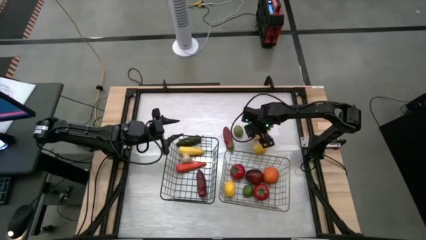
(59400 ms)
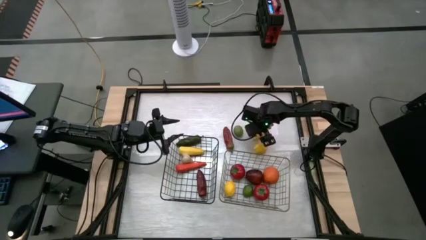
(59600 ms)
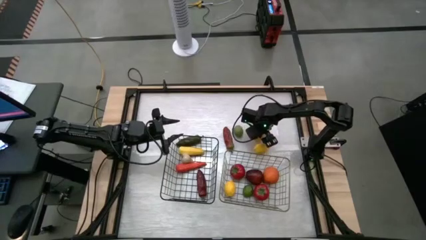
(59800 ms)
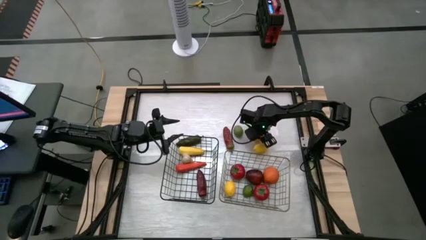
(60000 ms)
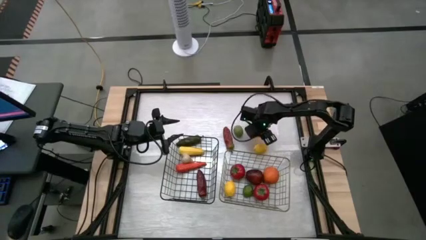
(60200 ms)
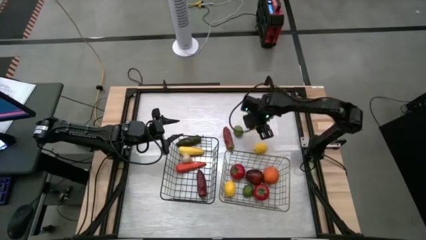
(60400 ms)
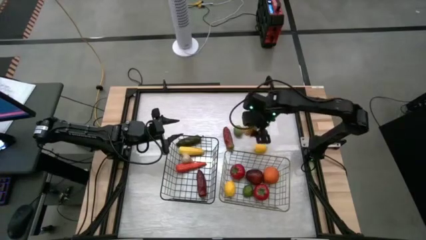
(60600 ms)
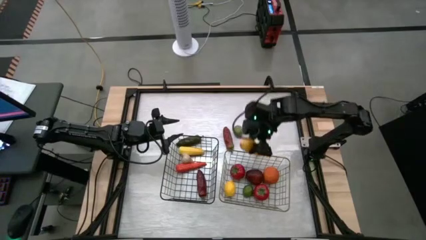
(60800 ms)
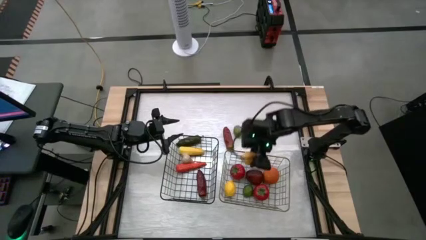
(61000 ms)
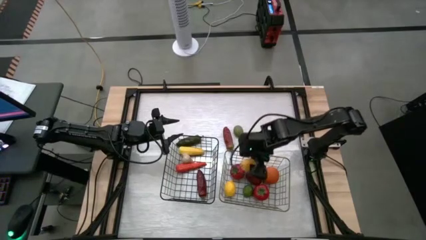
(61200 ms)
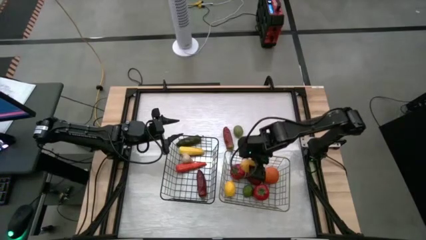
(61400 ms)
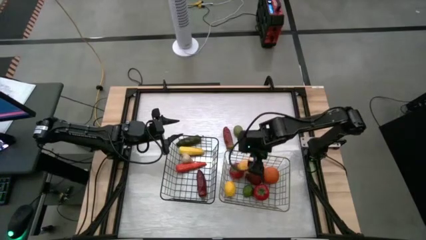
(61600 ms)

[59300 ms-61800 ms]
Task: Sort produce into baskets
Put the left lemon into the right wire basket

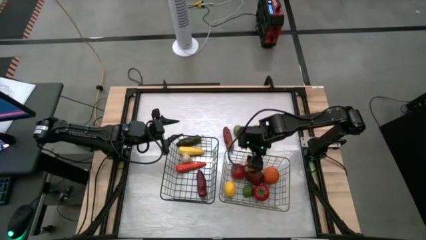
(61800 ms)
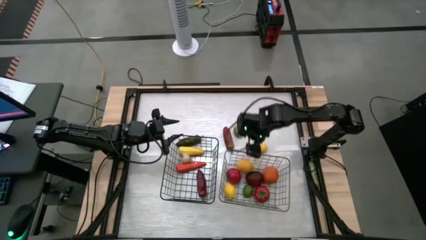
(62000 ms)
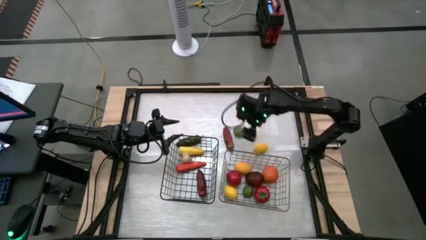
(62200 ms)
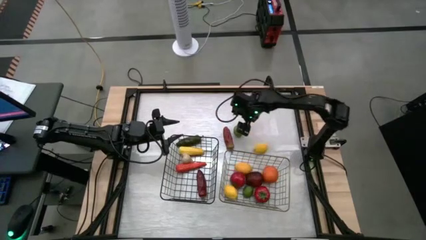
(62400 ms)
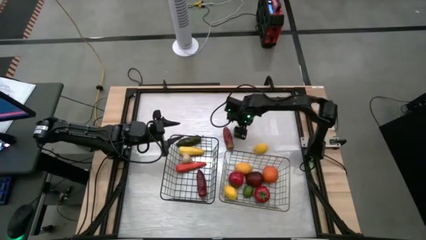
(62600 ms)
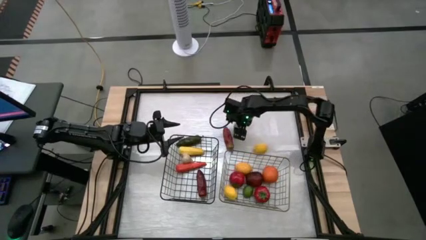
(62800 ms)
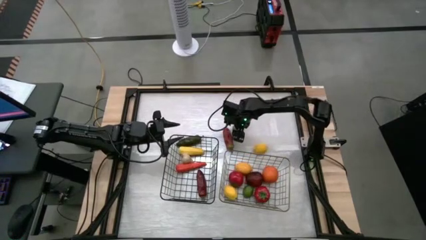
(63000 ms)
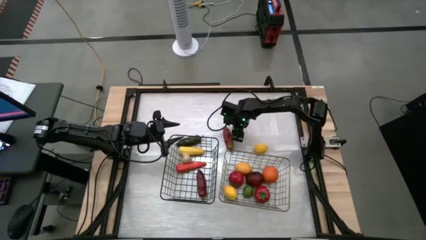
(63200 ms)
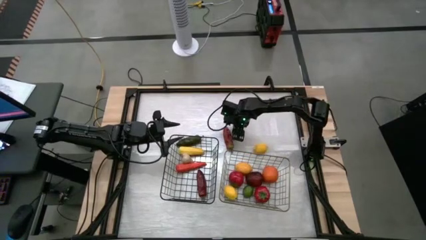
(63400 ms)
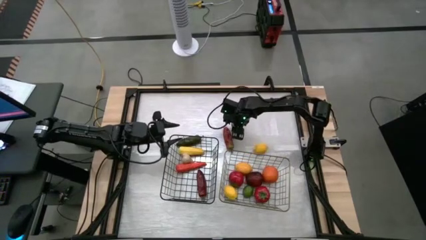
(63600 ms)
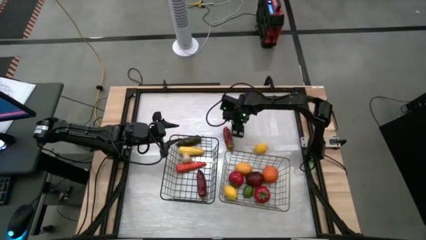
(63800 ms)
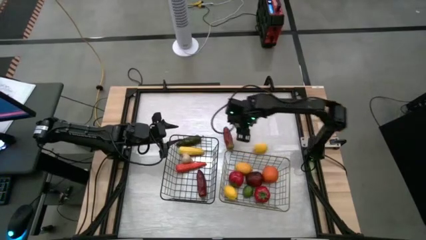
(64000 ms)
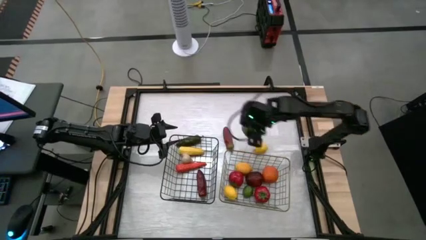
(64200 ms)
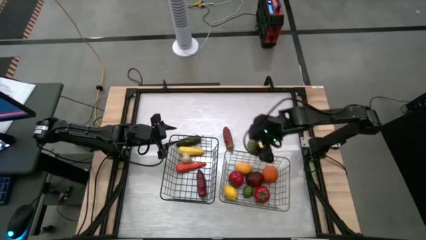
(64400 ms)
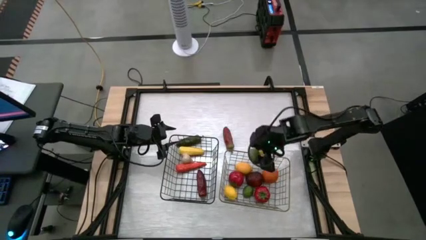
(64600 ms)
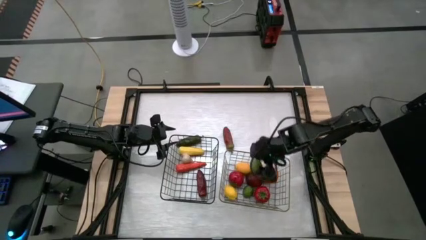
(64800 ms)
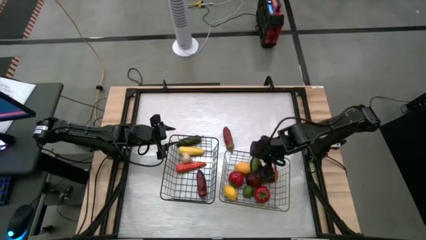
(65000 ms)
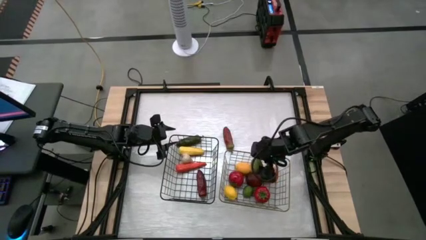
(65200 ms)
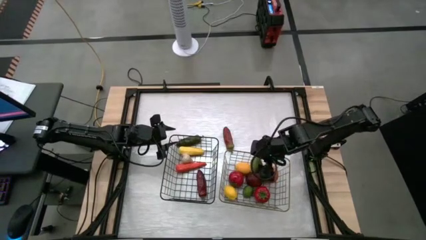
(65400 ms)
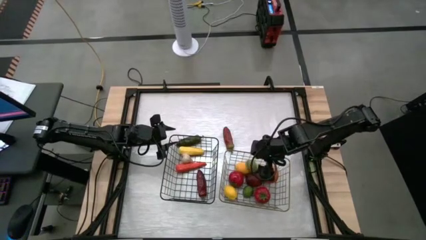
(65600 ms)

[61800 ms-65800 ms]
Put the green lime into the right wire basket

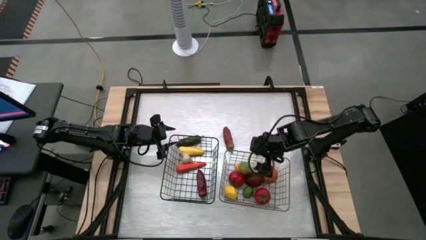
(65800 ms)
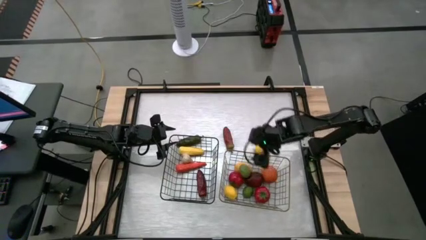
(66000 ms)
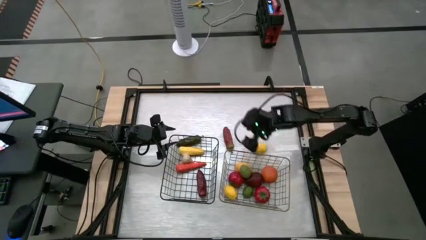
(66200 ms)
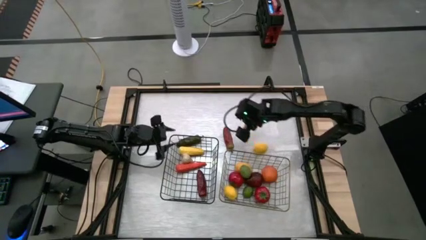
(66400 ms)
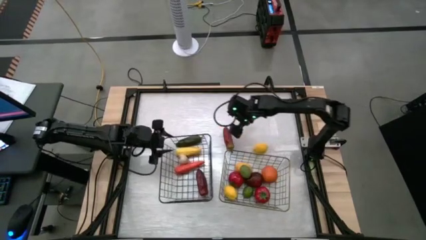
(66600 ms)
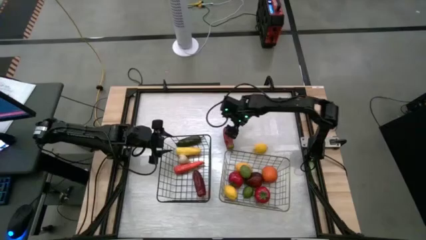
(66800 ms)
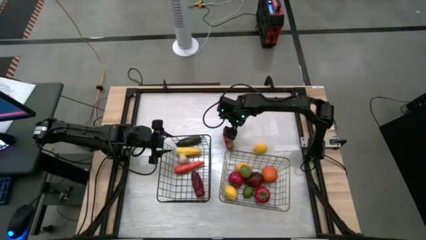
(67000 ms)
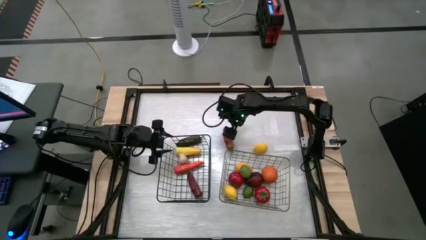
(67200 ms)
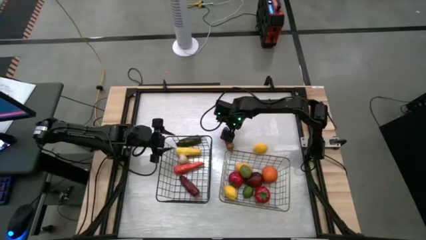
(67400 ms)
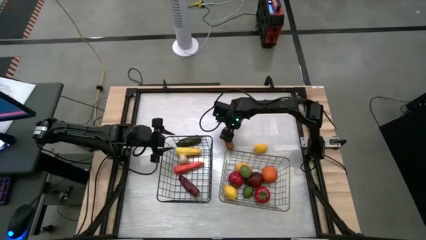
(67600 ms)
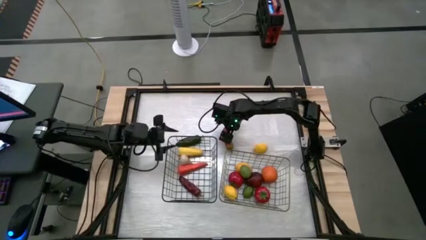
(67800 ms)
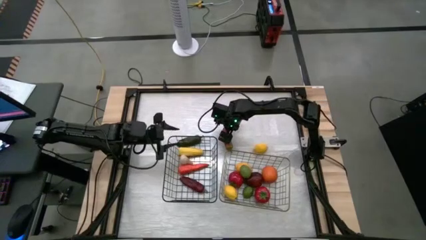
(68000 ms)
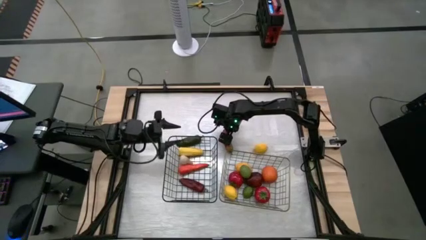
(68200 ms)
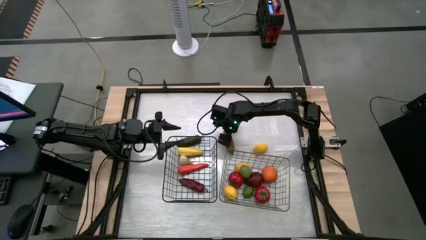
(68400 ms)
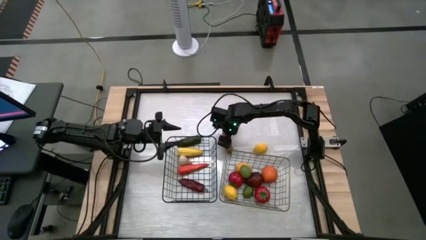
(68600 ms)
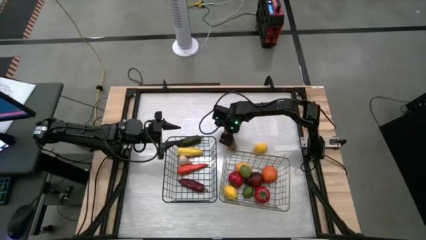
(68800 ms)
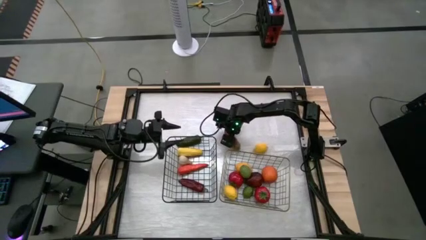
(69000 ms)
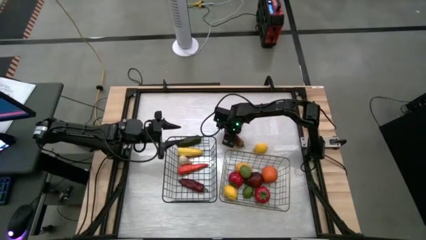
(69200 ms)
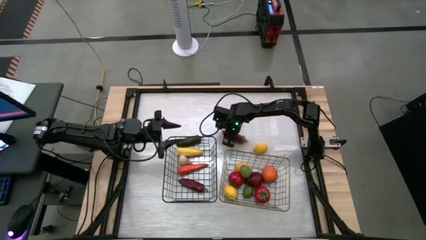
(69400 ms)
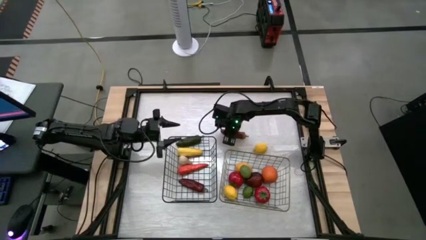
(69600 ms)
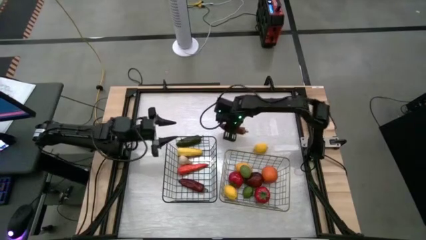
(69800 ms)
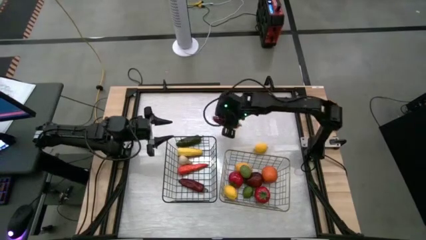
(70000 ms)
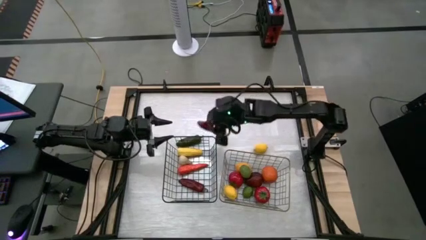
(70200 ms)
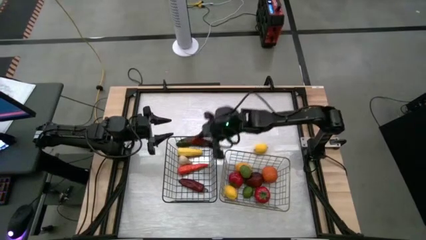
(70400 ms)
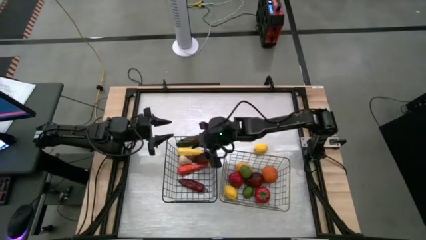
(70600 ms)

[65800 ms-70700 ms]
Put the red pepper into the left wire basket

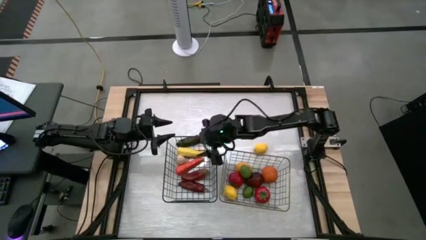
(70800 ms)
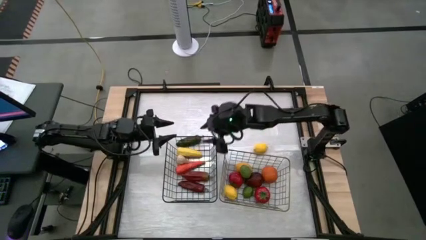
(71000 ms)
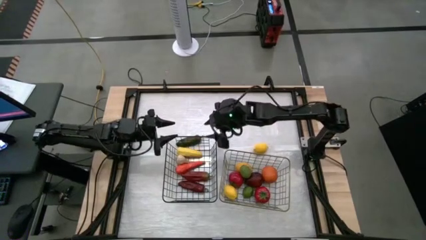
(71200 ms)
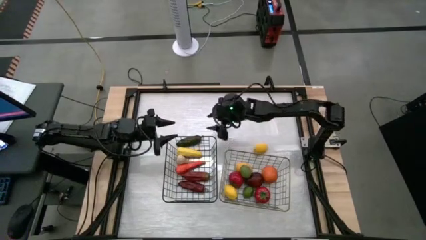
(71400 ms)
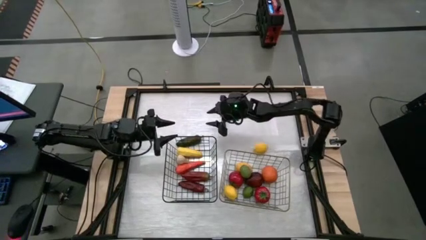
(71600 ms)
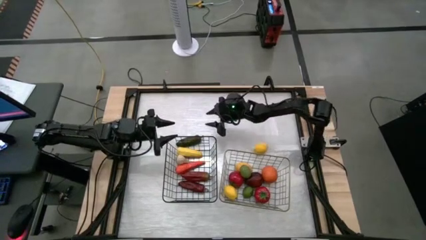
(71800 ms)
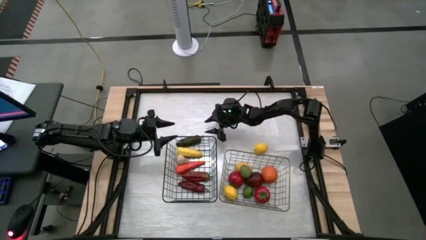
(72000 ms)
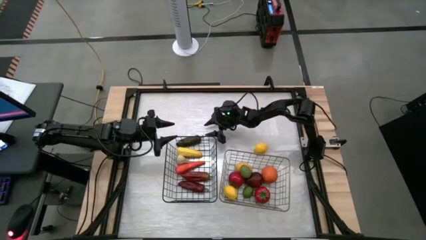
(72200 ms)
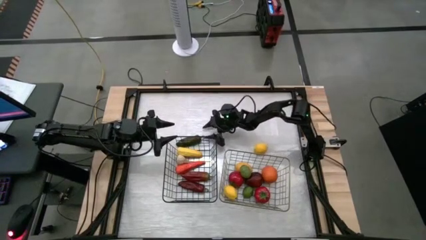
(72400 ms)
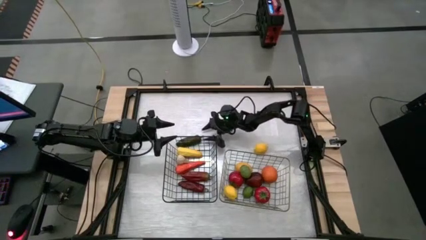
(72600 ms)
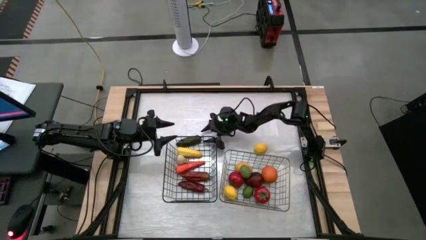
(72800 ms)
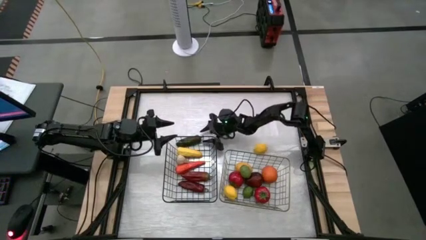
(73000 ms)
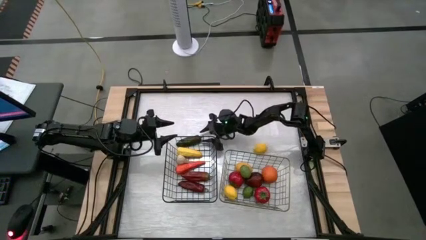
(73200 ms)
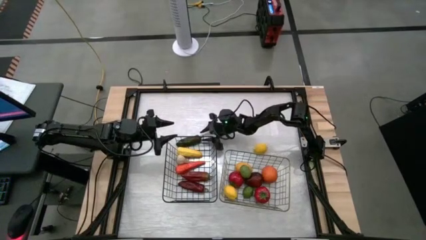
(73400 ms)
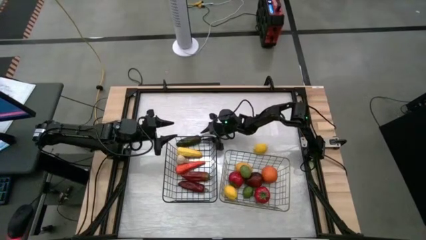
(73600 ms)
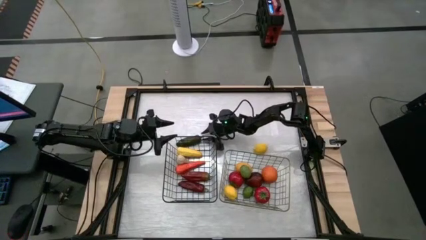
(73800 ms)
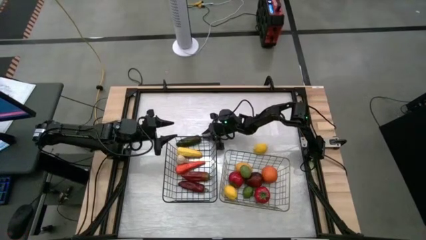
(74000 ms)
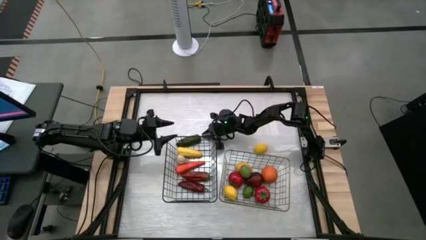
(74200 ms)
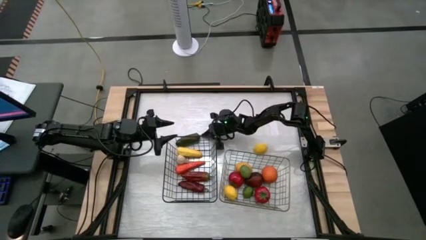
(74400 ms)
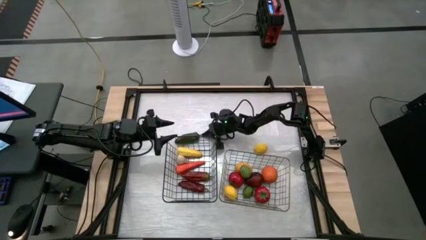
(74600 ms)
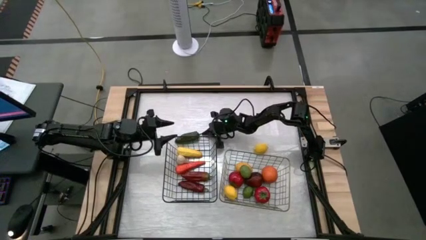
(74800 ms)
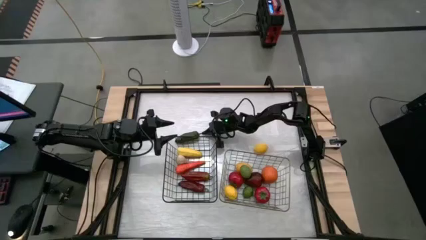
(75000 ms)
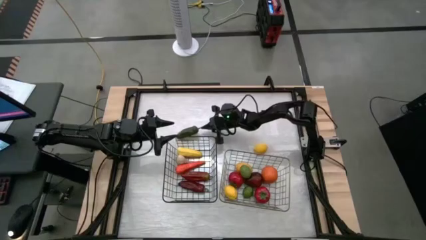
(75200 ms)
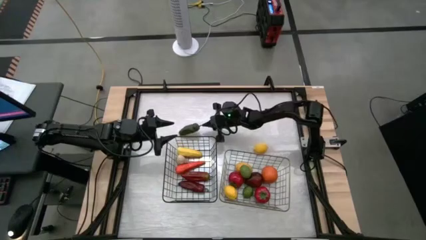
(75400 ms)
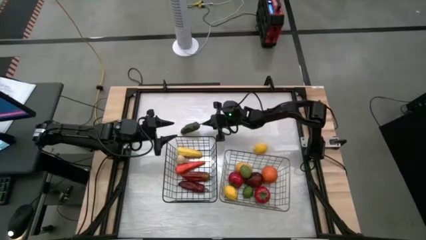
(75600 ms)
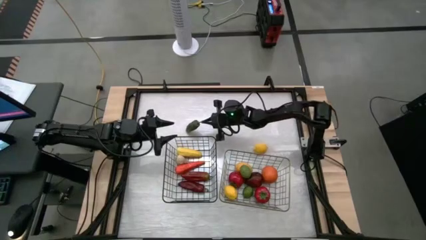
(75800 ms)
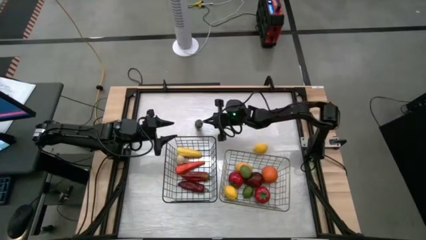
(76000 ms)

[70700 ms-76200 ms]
Put the green pepper into the left wire basket

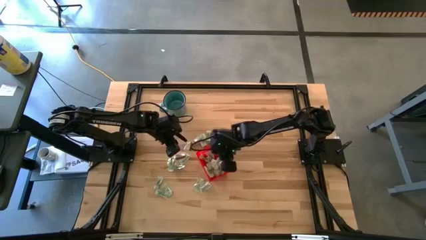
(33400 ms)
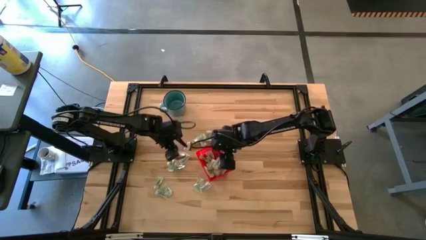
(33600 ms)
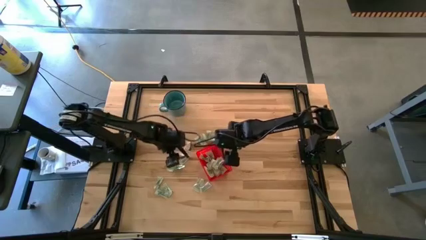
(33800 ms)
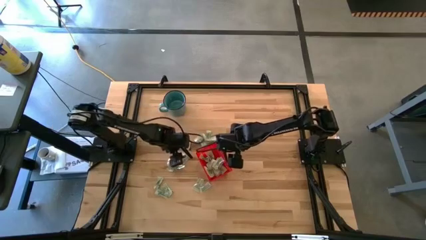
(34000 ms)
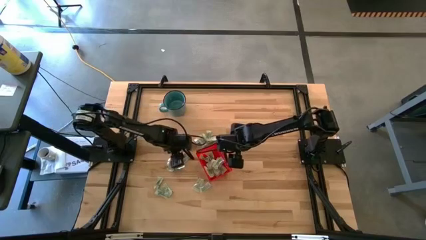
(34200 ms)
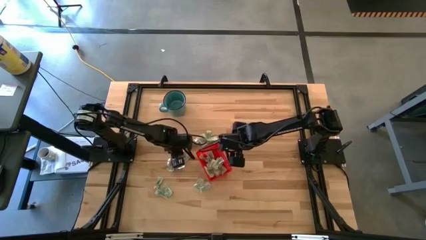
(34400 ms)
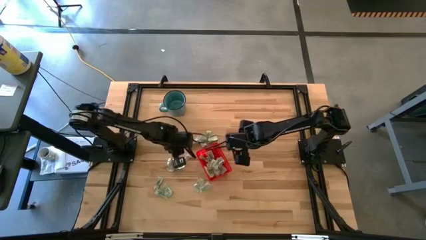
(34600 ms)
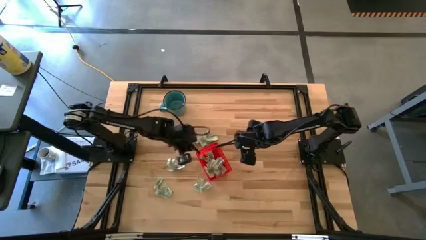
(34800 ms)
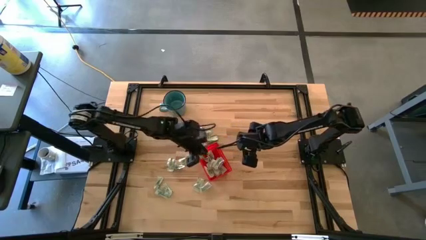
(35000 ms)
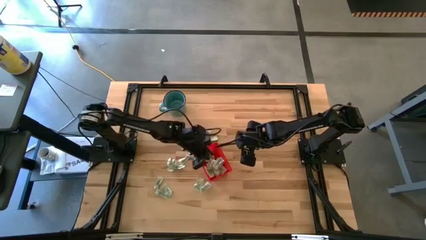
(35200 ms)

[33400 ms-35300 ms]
Task: Pick and place Stevia / Truvia into bins
Put the white stevia packet into the basket
